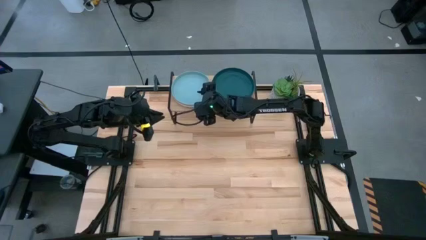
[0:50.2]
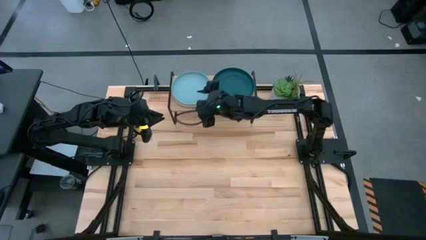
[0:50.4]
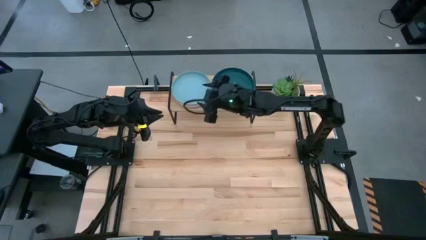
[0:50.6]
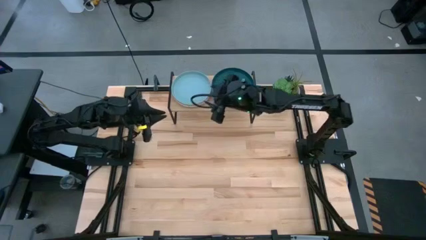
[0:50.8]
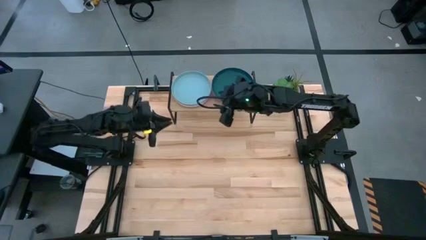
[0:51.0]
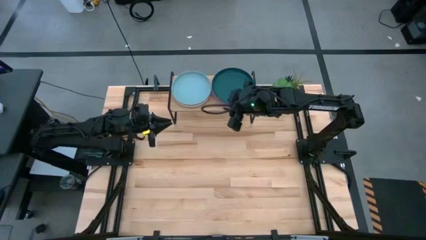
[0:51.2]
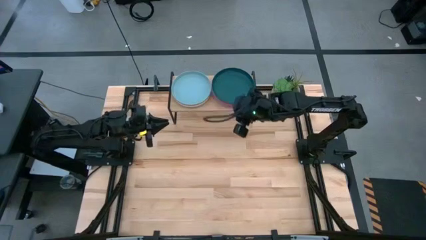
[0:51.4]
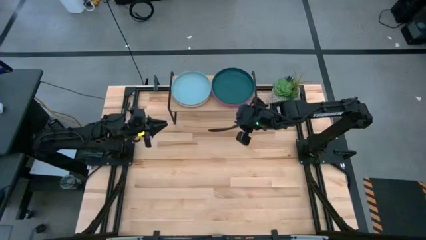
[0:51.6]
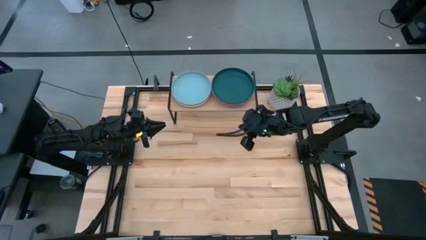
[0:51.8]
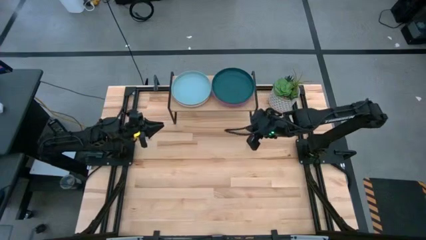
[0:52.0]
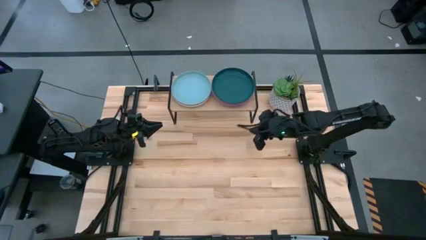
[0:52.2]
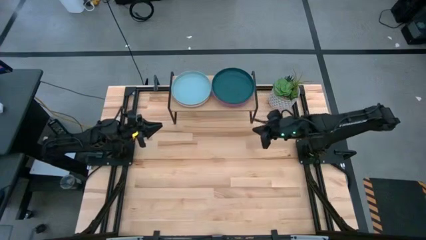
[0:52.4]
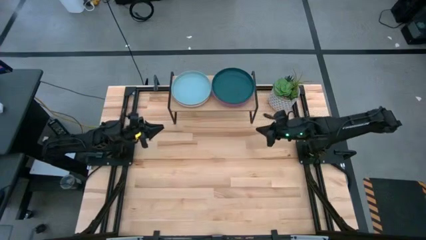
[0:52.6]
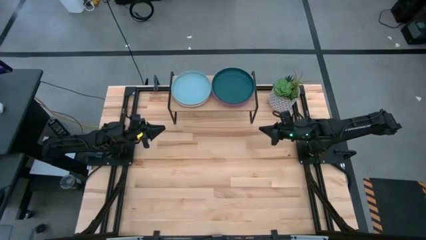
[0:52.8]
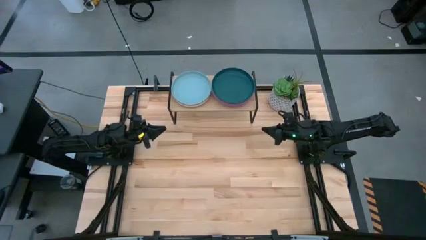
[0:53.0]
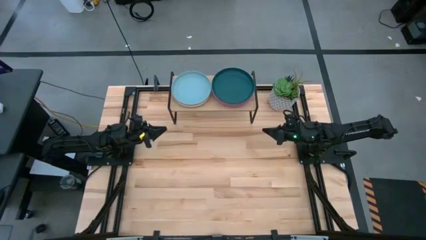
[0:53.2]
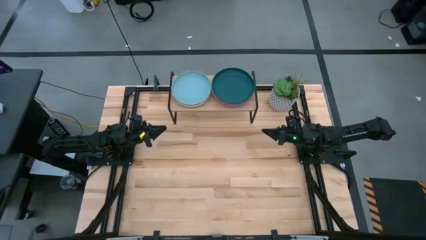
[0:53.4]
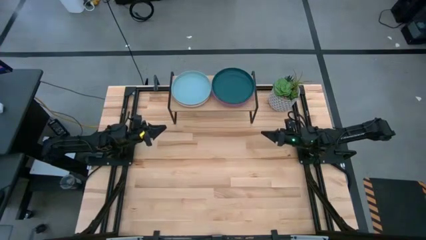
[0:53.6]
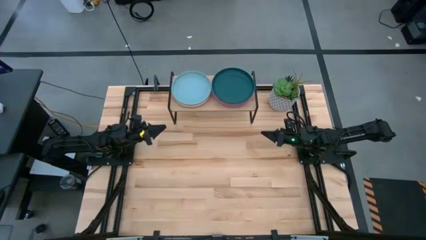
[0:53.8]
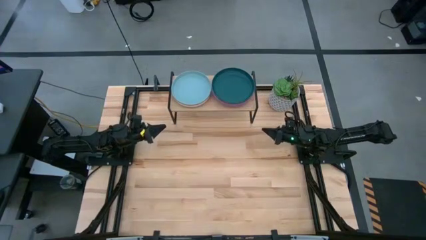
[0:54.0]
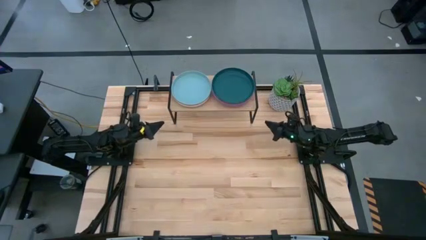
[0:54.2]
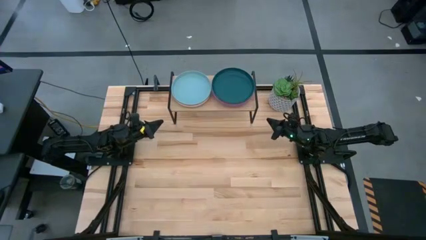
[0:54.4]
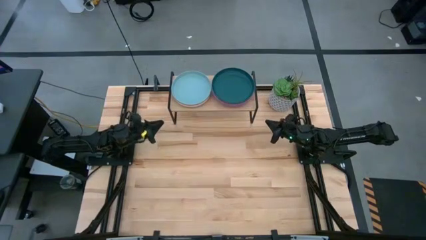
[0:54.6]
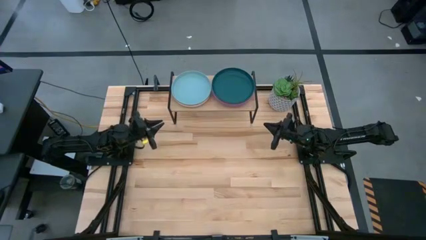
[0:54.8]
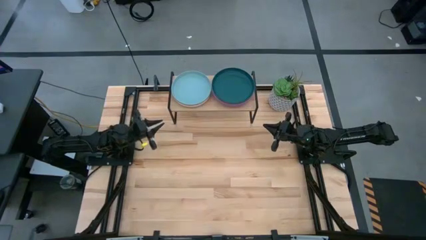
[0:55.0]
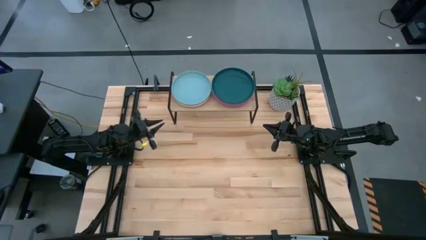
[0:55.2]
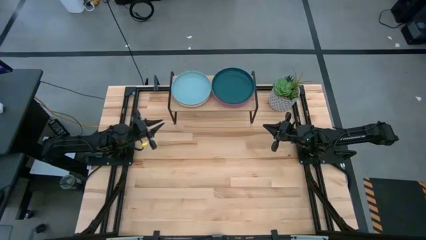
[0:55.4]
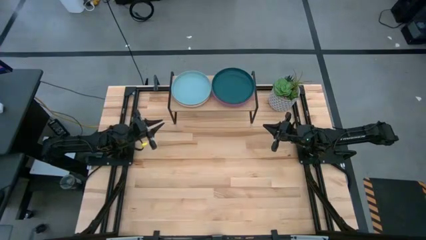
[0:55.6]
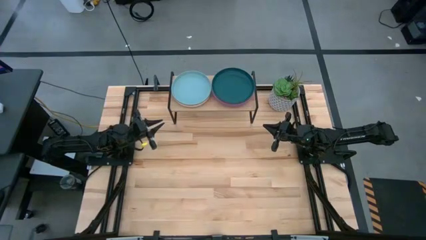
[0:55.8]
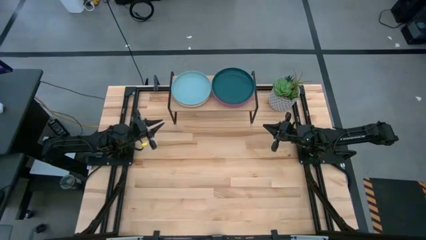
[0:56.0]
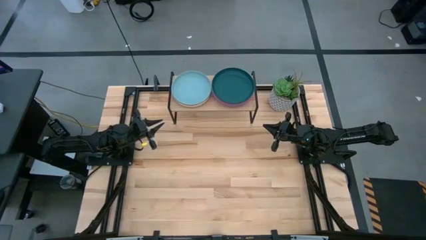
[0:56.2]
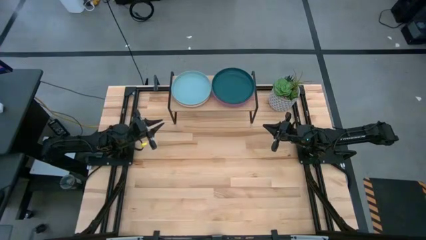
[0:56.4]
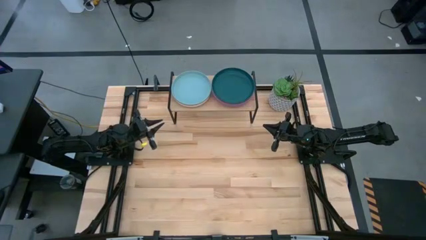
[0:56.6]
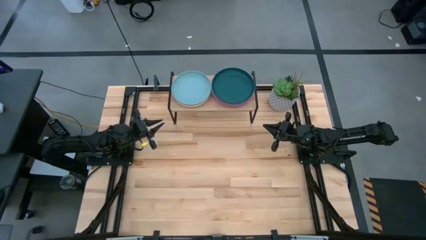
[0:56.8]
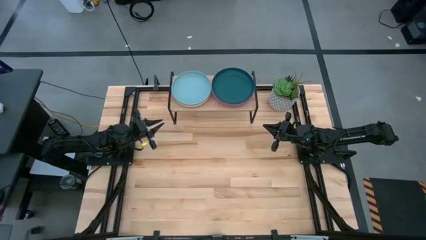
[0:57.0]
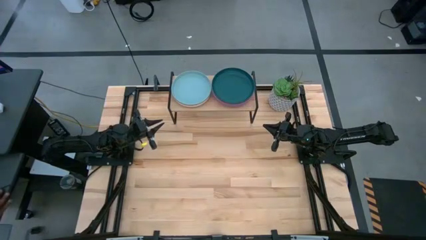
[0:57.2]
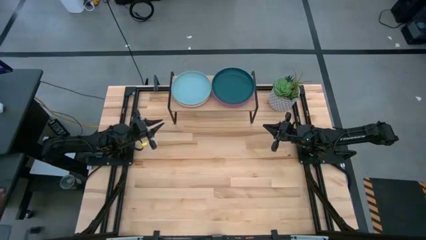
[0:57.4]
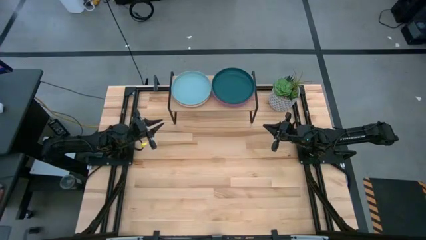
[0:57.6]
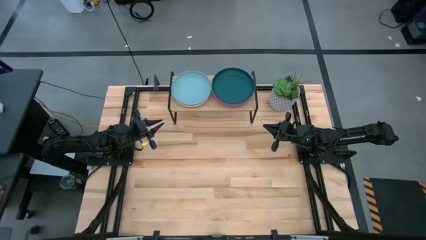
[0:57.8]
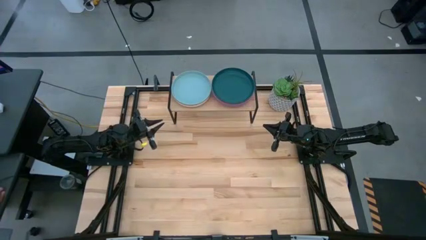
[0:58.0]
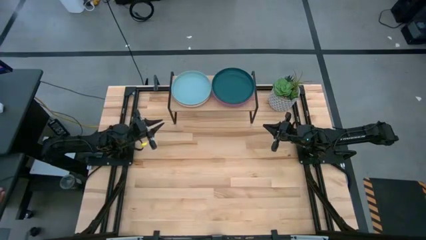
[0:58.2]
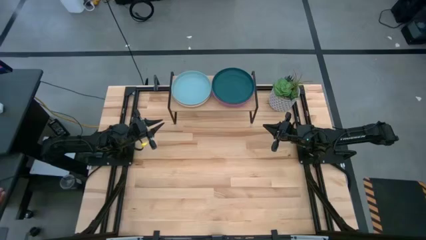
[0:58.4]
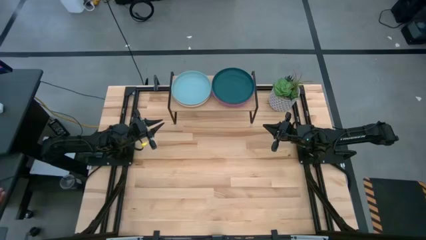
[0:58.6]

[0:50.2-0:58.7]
Task: Place and stack plates onto a shelf
Return to Home Position

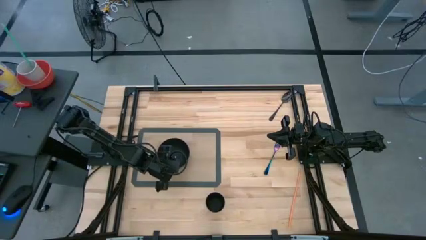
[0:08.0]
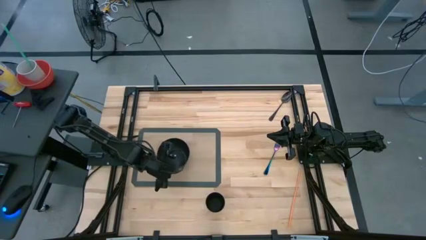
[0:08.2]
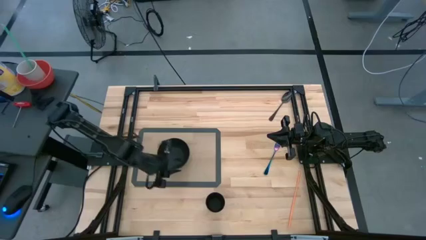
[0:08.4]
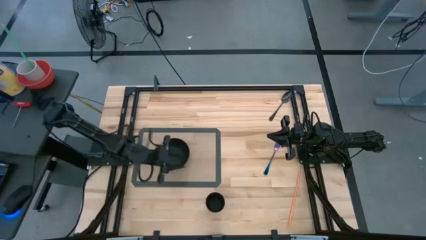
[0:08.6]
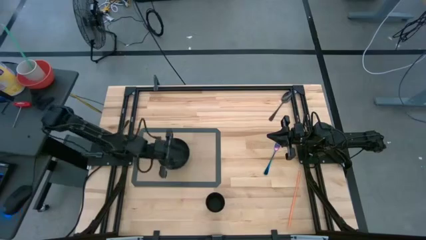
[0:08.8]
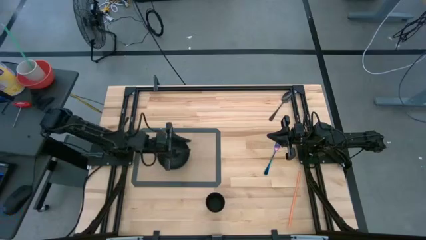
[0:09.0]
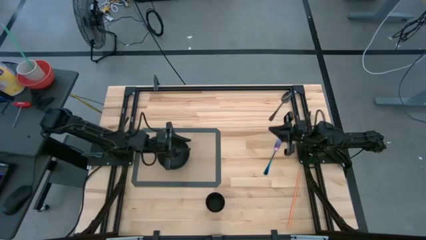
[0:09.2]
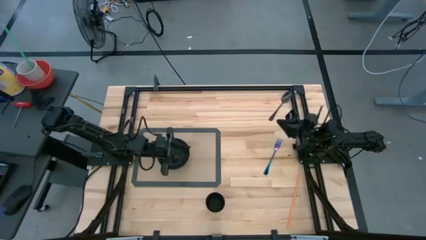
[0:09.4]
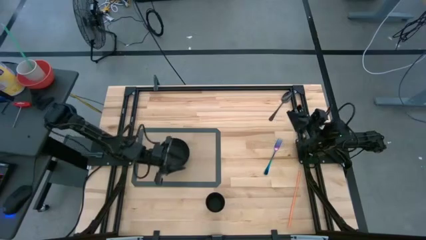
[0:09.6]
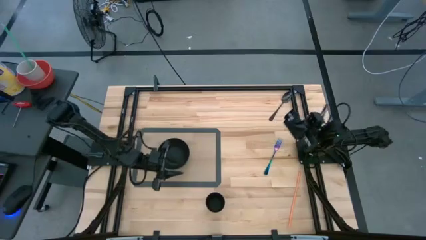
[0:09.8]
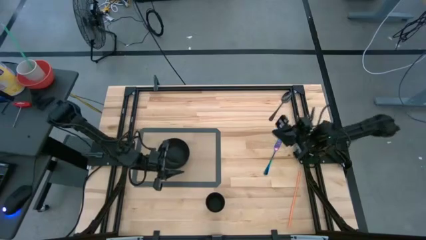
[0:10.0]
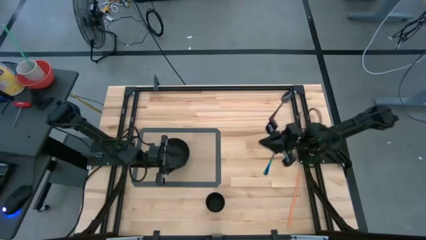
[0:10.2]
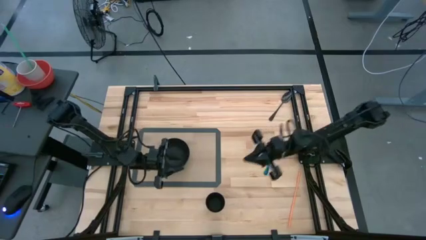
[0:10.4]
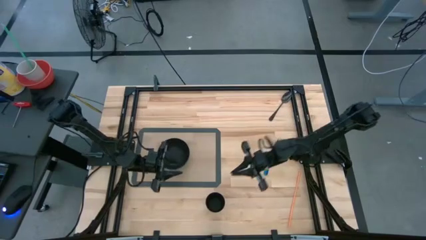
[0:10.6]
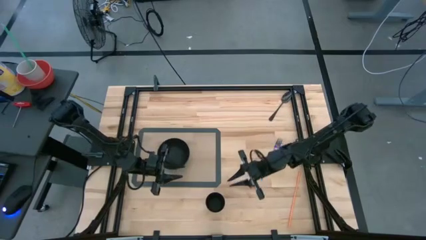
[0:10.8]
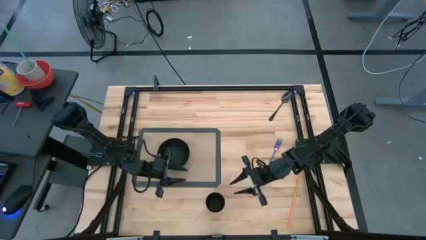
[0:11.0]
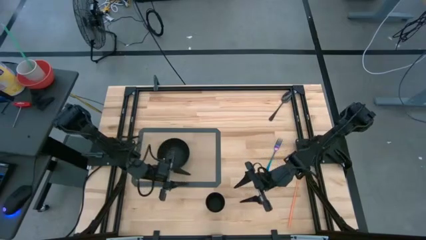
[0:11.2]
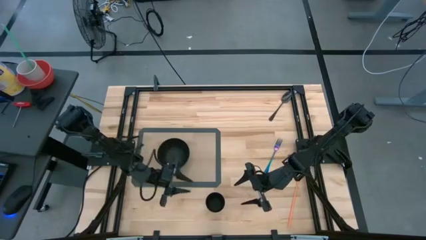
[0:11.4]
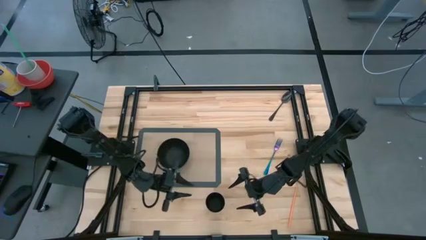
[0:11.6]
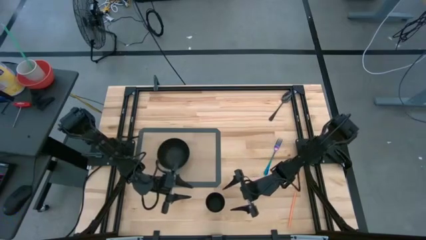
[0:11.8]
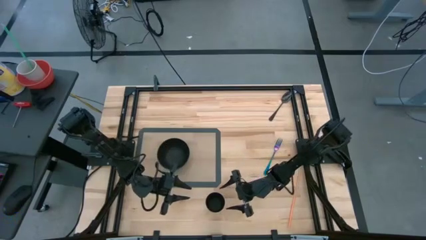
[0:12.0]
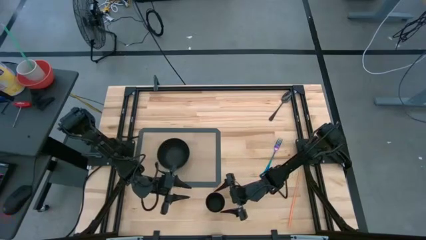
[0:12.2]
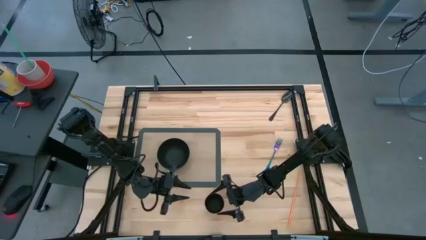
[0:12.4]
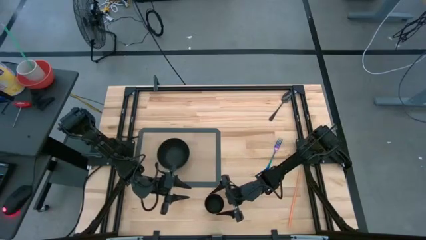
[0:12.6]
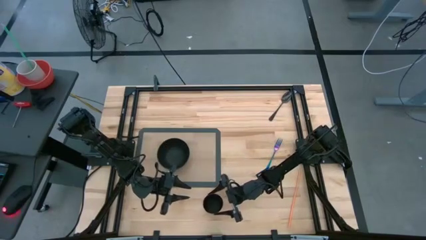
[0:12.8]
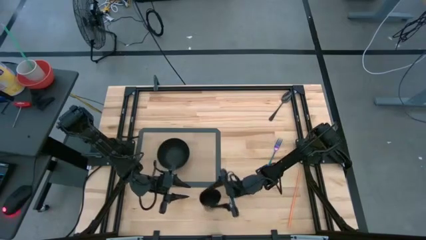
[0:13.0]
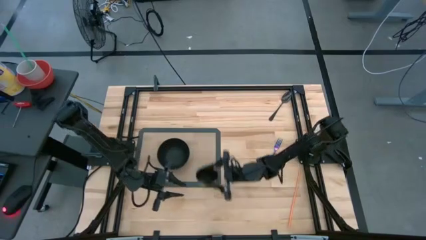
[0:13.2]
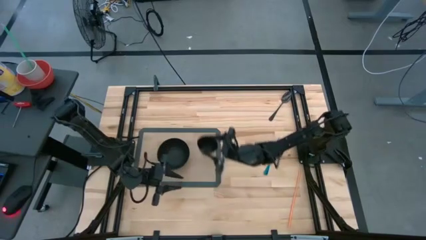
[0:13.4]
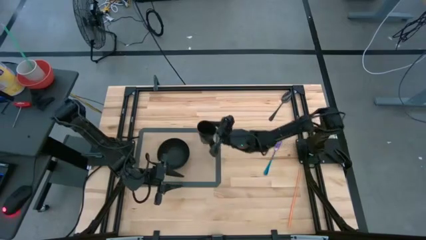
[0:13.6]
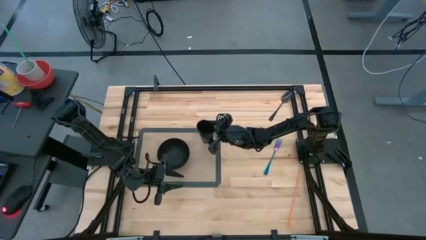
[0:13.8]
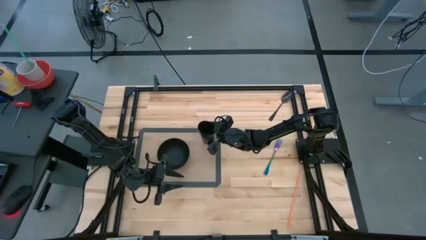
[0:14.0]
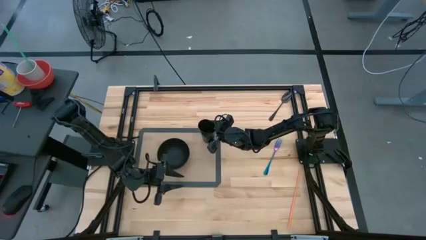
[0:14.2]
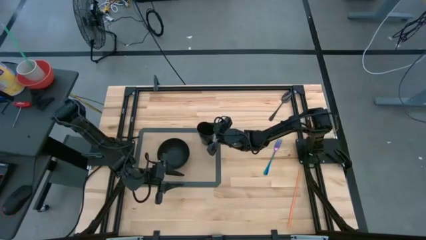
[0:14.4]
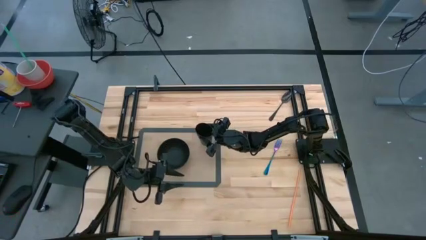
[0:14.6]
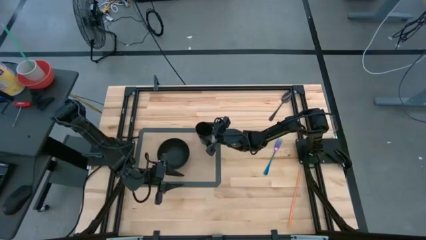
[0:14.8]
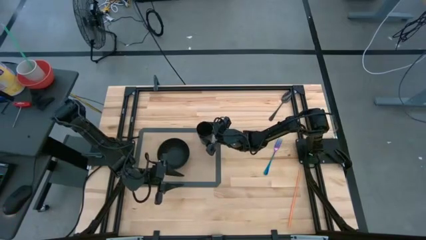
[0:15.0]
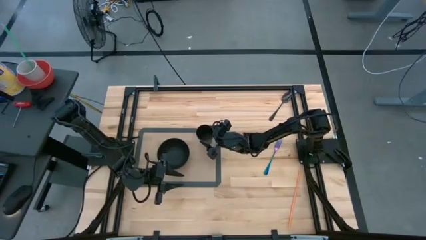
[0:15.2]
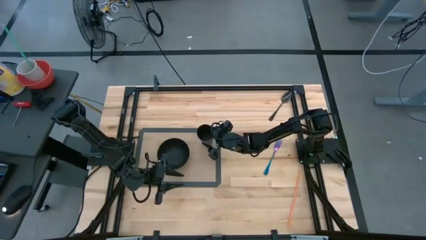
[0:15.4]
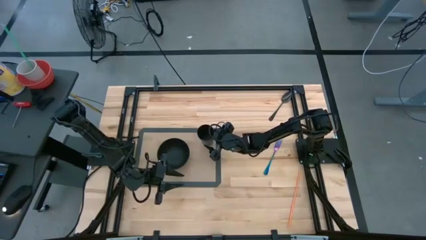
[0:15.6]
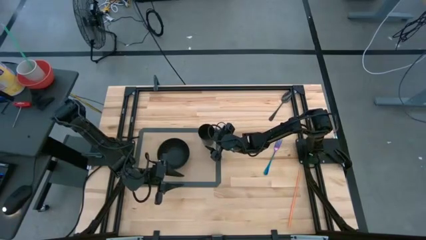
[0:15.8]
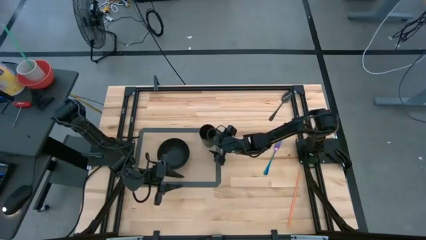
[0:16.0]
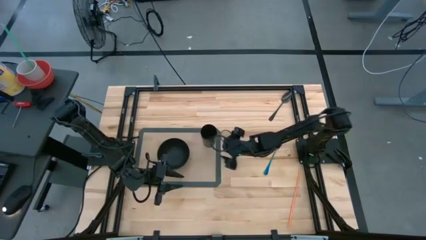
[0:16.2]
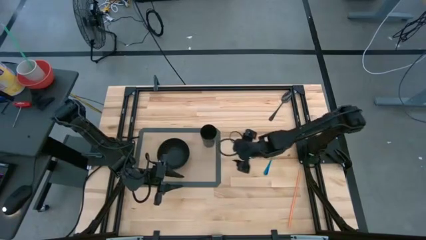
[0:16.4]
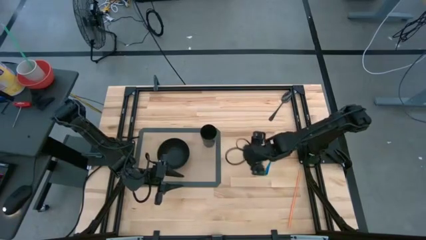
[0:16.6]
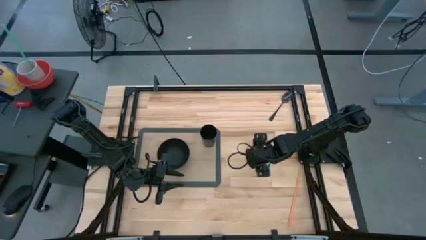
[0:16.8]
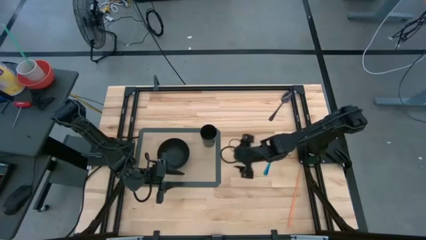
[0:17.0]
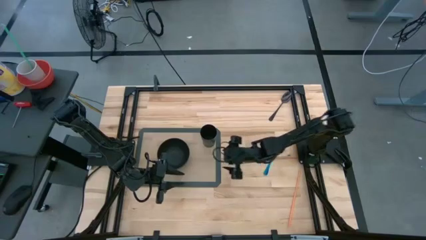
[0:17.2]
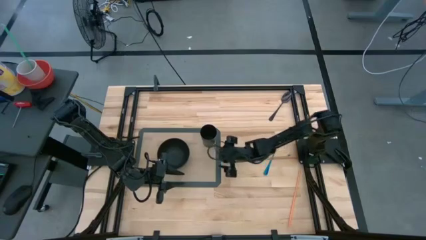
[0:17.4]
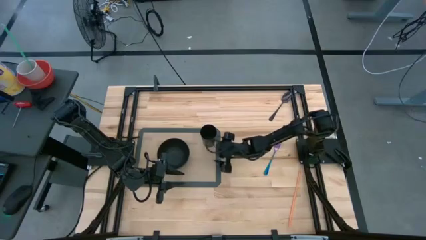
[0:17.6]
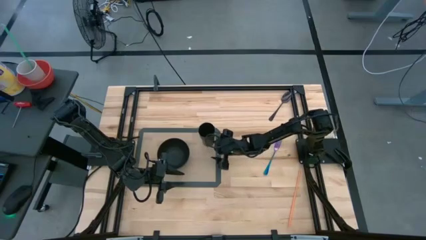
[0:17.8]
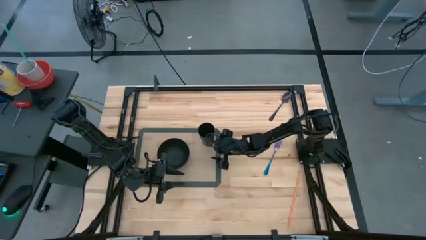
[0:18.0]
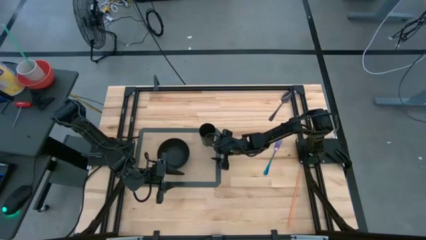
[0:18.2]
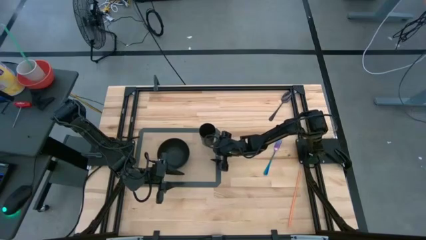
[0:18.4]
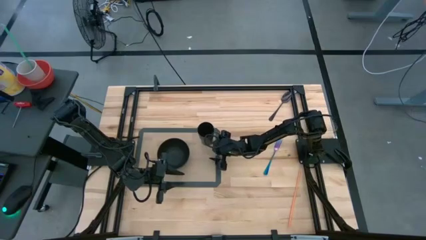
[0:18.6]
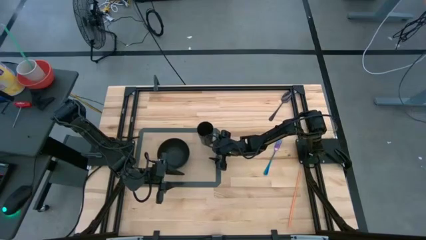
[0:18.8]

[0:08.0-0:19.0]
Task: Pick & Place Utensil
Put the black cup on the top right of the black bowl on the gray placemat
